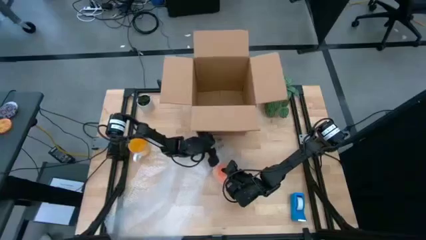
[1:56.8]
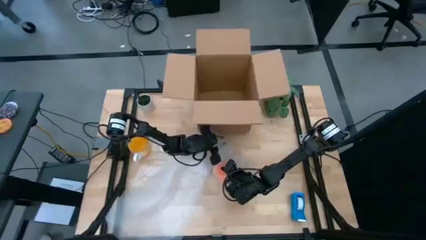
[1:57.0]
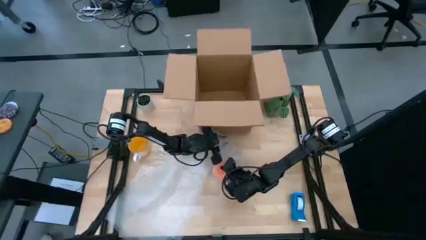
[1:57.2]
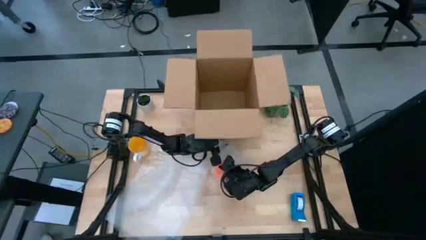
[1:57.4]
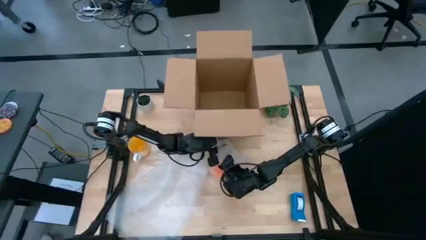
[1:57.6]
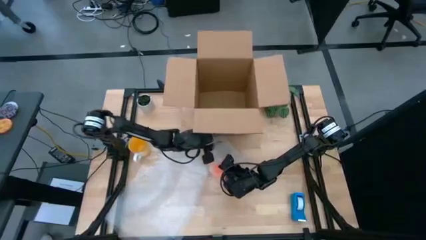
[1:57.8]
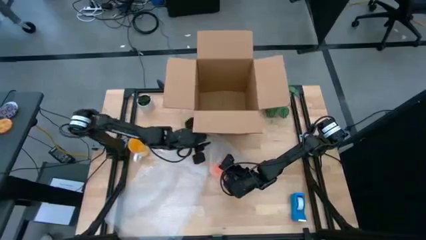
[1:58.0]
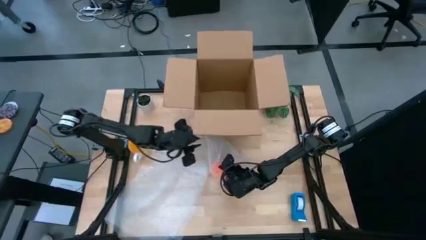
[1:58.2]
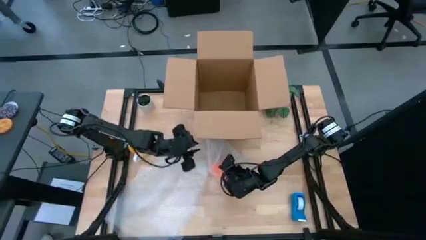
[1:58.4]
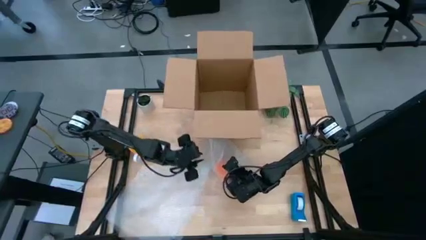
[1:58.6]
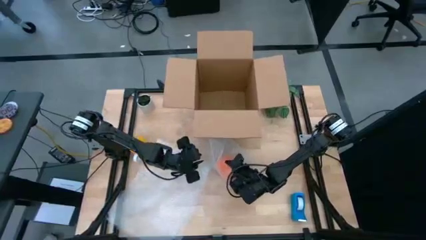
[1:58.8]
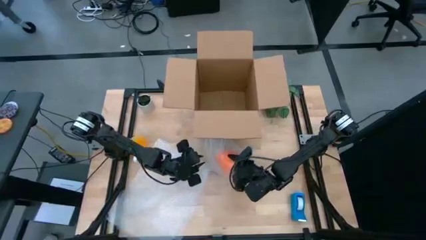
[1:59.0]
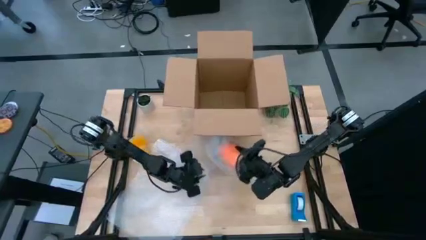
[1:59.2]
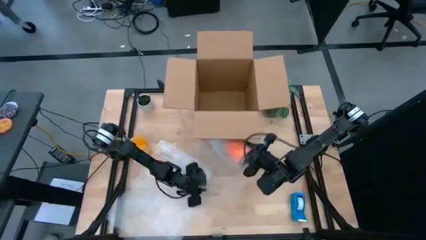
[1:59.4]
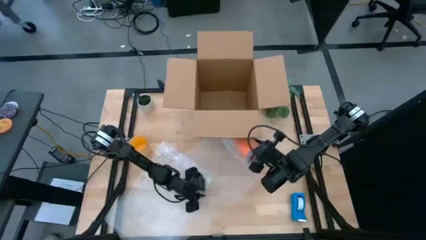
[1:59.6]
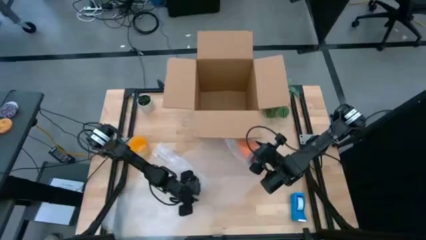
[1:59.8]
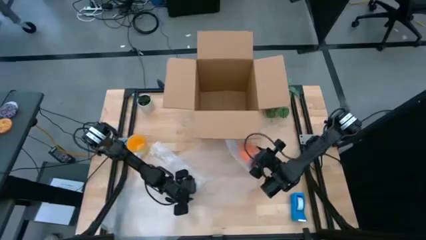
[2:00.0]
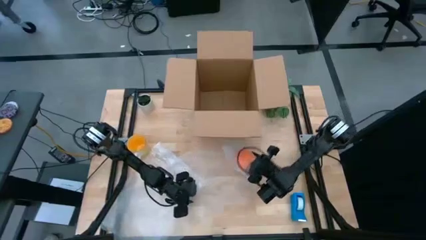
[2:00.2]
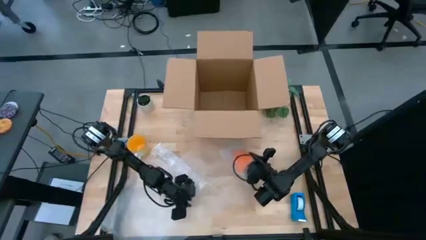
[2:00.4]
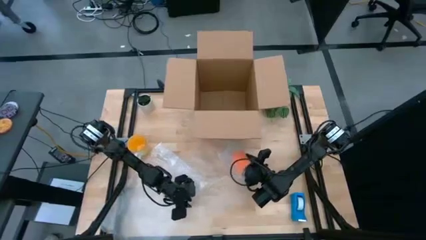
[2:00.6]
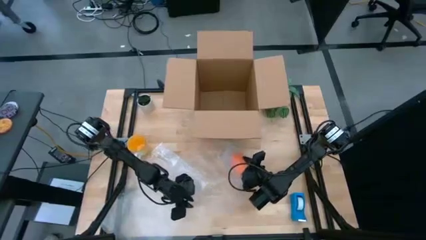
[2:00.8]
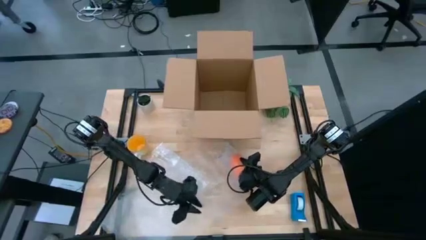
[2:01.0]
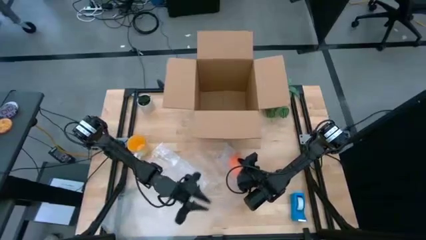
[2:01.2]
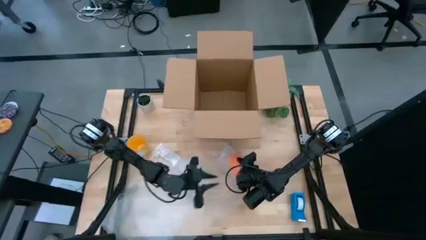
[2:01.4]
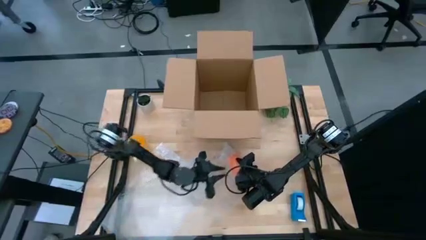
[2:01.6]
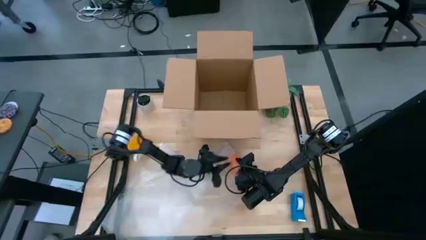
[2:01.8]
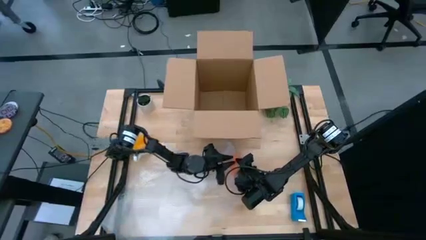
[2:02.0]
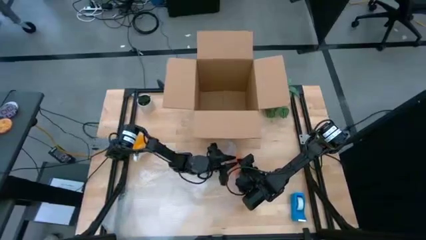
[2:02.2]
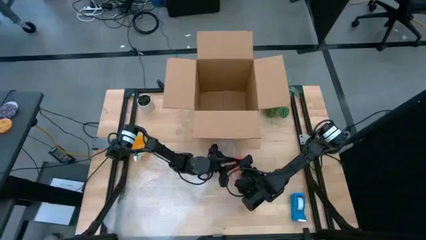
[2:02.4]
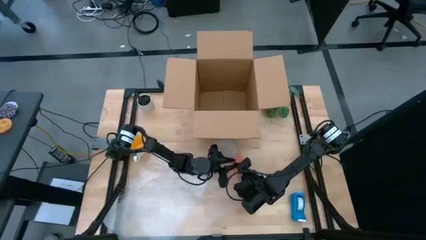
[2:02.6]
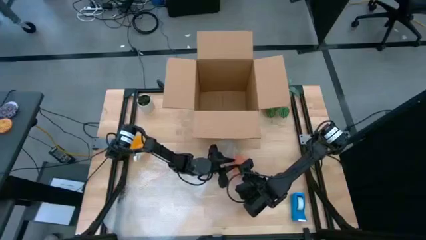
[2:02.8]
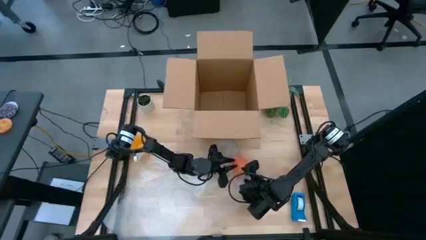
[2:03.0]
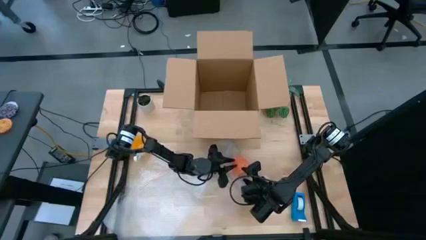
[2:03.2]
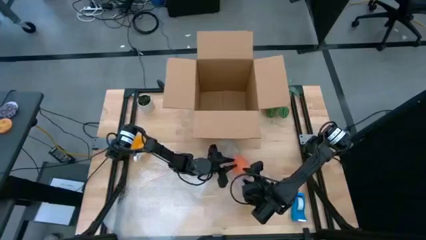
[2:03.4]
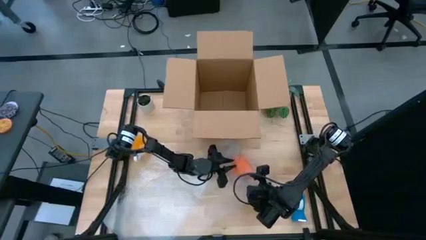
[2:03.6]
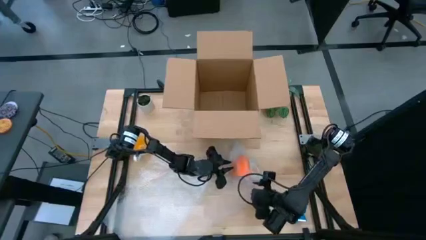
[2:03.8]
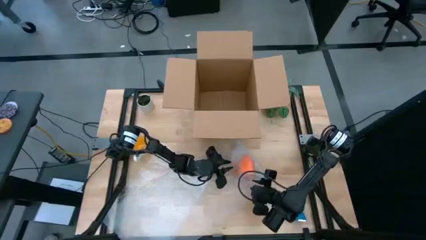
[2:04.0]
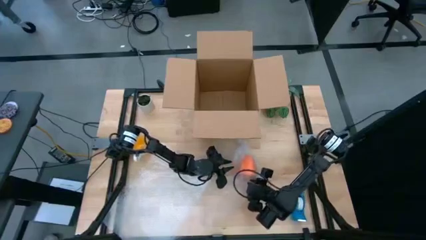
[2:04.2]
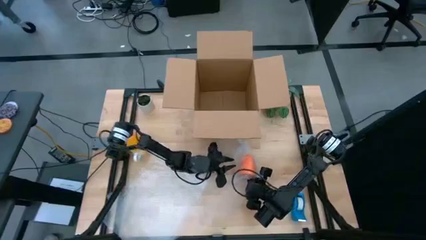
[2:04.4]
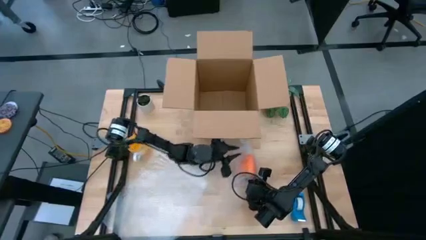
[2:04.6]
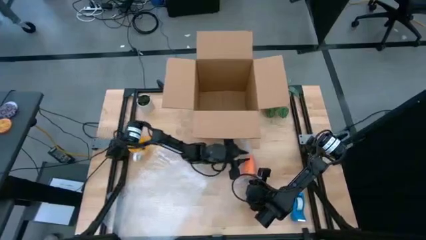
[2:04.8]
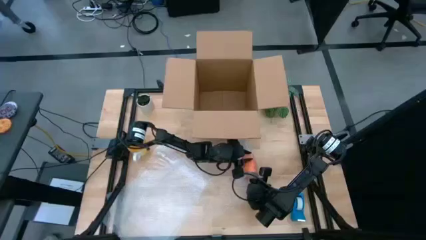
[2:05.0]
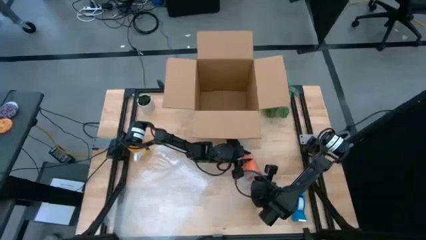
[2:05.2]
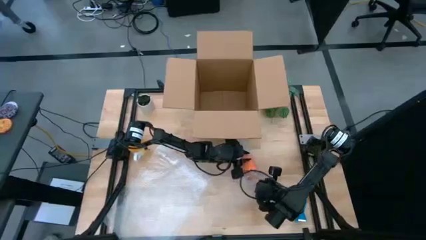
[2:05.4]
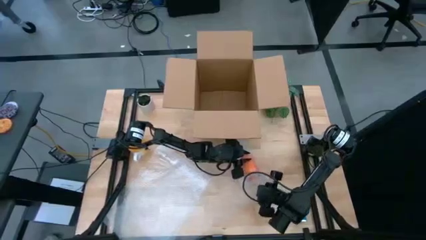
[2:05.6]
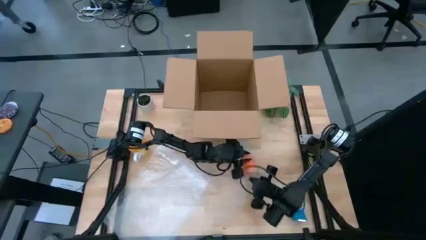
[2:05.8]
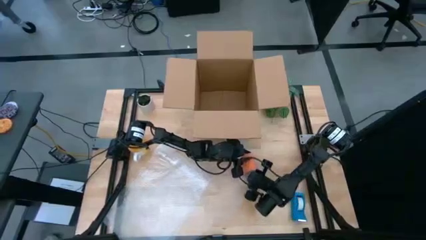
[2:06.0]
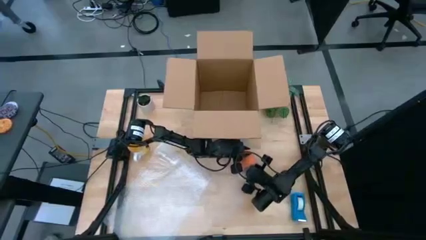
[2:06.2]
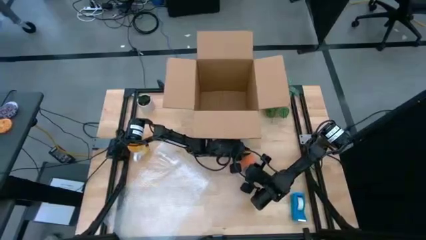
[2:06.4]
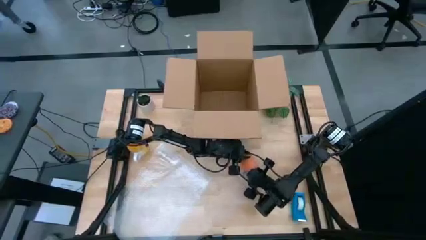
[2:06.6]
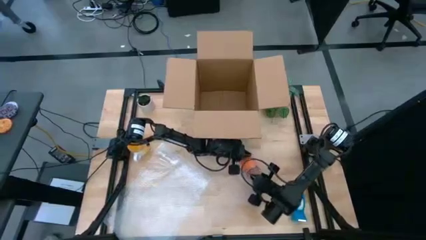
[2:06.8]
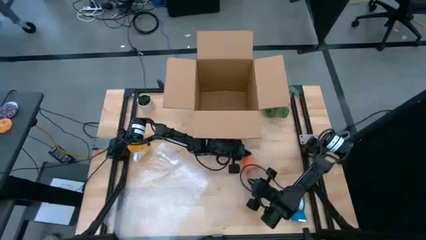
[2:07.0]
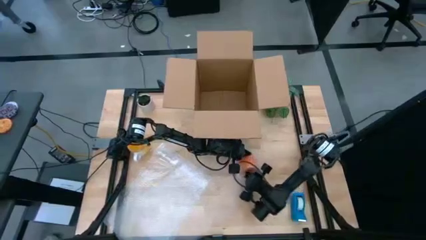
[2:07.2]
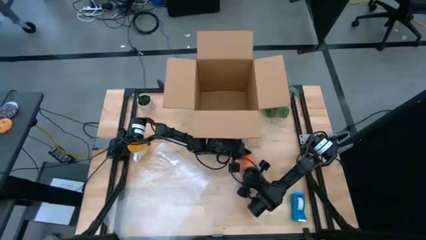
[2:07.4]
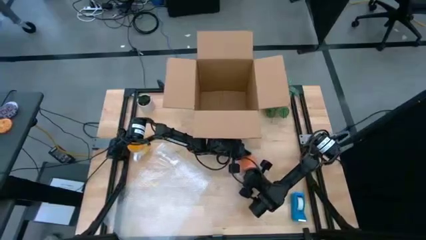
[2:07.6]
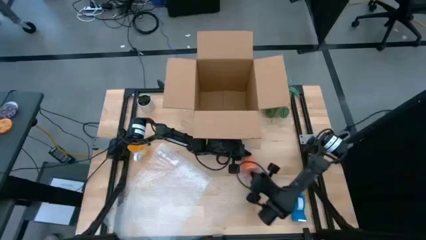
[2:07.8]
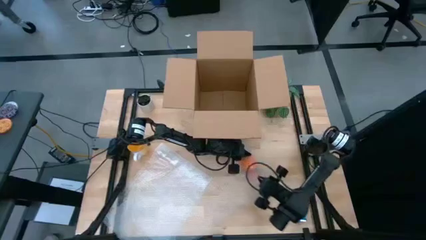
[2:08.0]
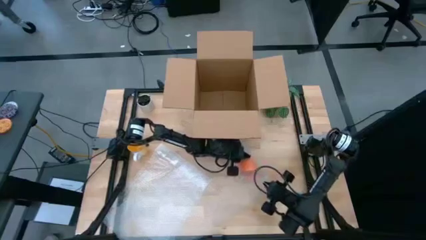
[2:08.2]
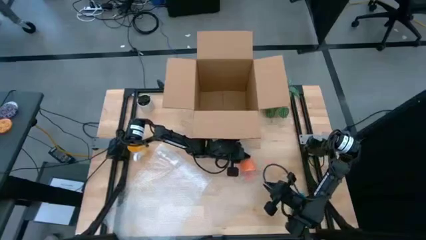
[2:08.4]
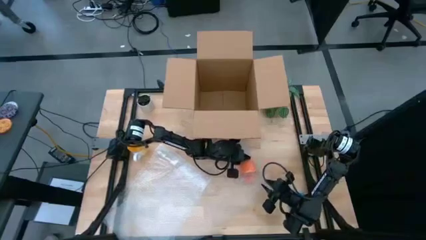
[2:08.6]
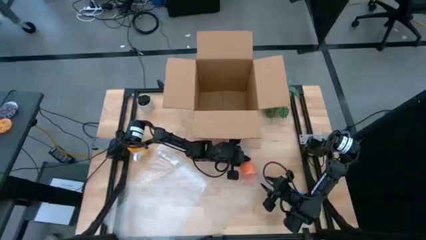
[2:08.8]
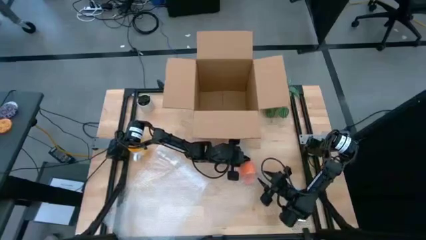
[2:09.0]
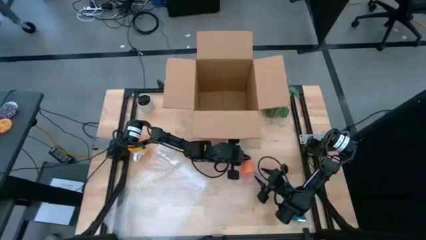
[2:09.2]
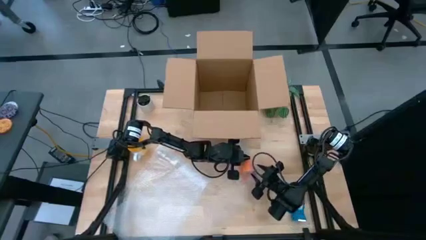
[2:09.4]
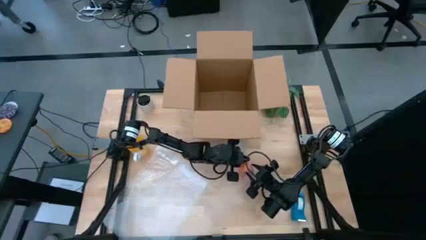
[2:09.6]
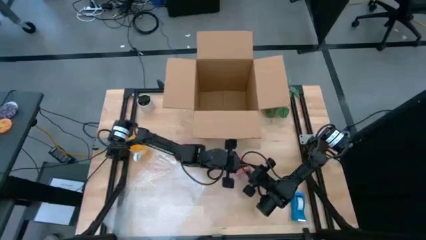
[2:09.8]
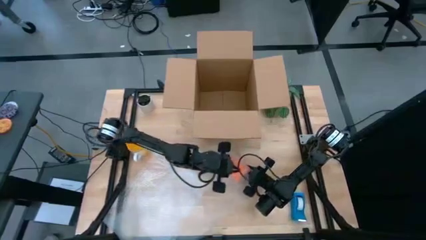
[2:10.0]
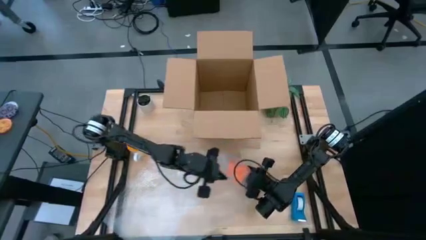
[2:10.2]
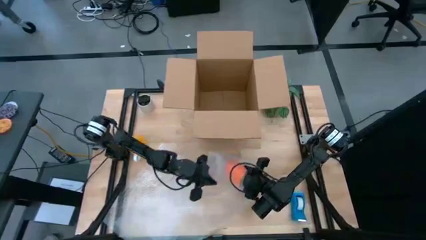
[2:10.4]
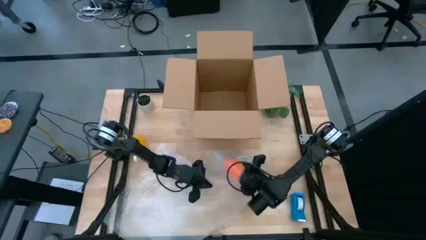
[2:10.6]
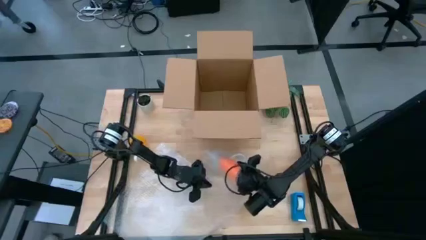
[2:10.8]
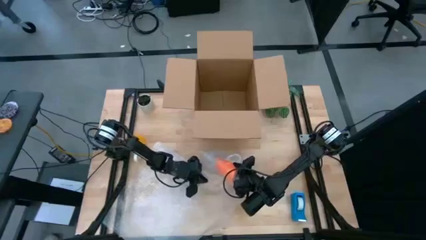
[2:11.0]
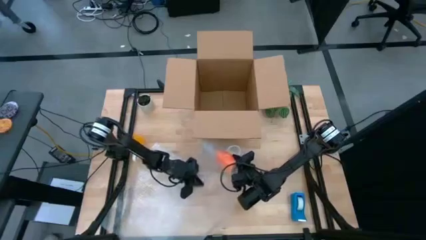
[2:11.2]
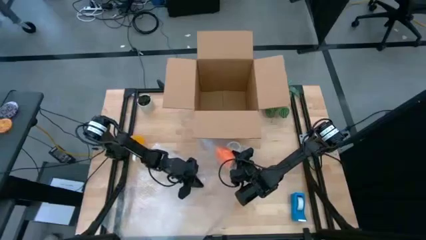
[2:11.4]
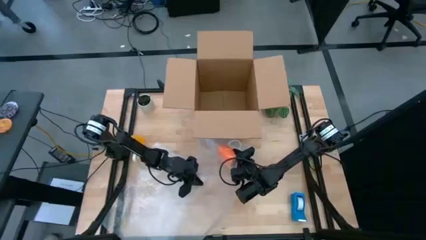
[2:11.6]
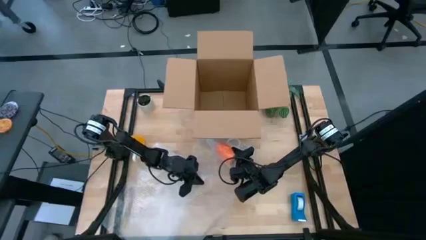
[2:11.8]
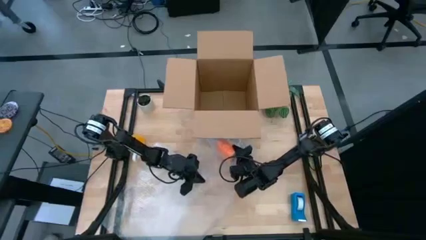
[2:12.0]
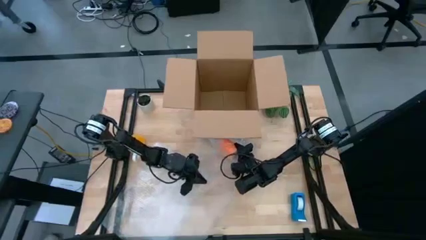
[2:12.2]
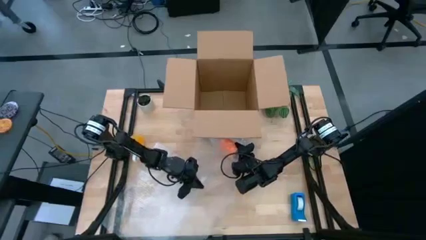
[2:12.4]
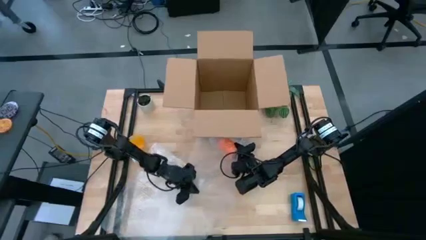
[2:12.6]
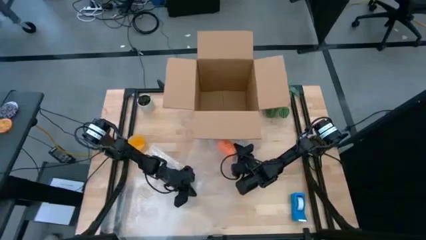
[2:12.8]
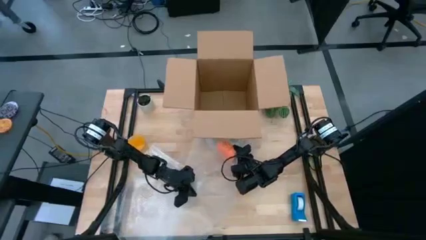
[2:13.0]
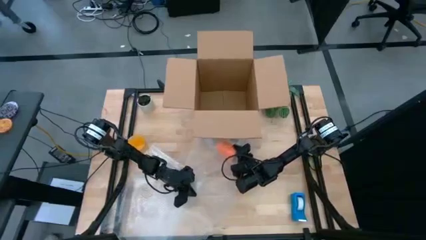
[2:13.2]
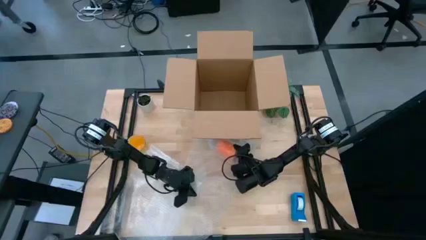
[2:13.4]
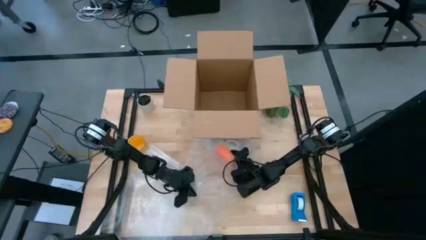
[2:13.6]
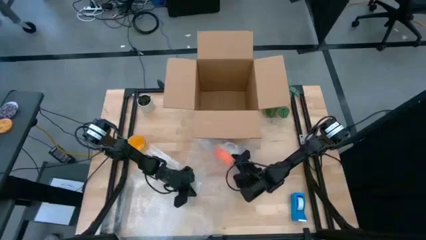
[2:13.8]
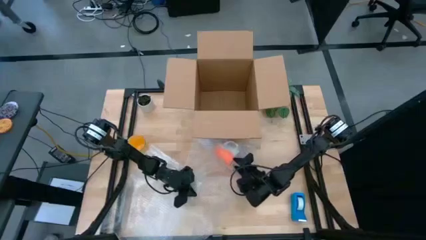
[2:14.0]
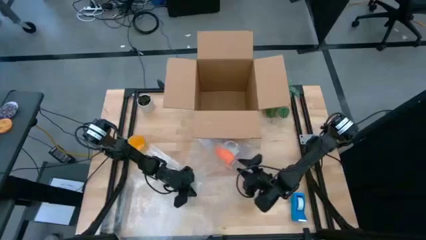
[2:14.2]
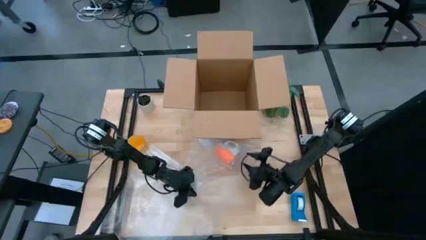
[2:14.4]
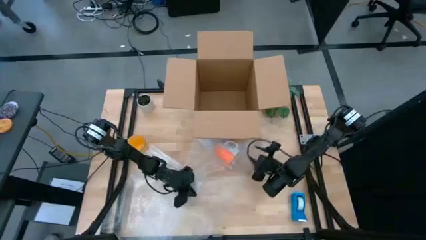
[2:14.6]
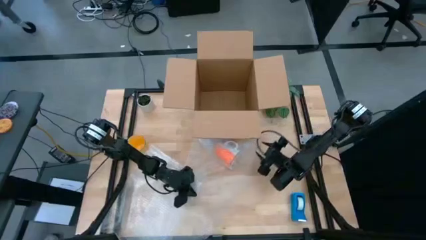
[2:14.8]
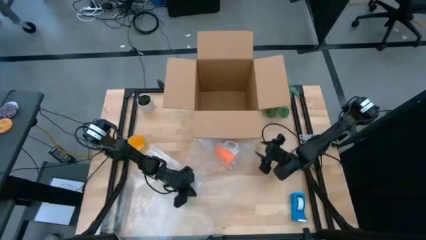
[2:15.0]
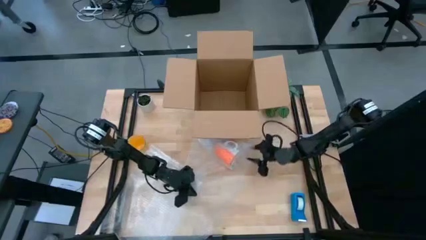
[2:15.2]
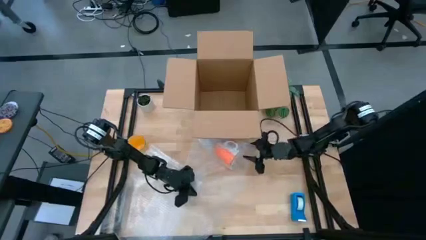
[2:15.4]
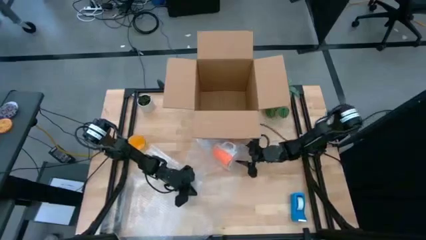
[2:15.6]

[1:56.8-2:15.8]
Task: wrap mug
Wrap the orange mug with the bubble wrap
